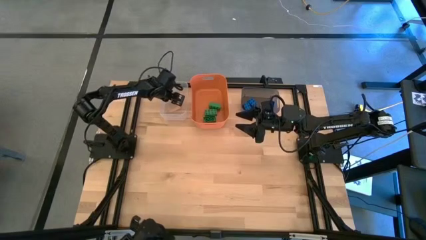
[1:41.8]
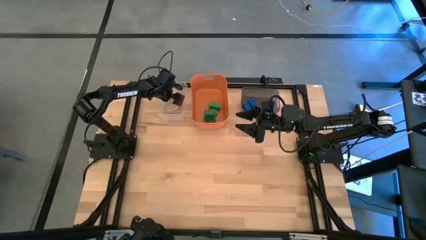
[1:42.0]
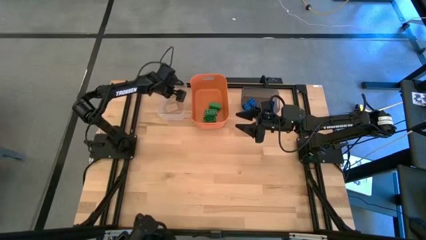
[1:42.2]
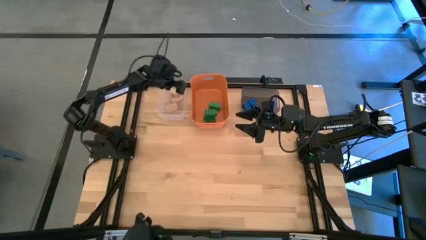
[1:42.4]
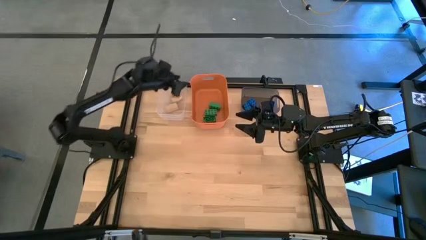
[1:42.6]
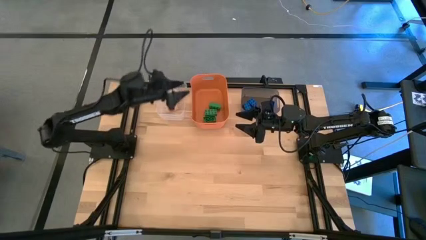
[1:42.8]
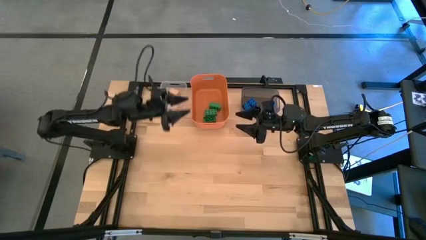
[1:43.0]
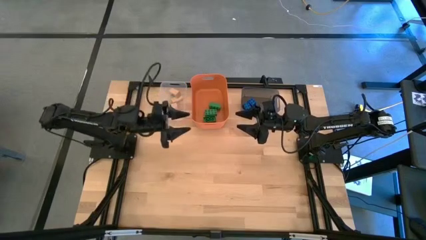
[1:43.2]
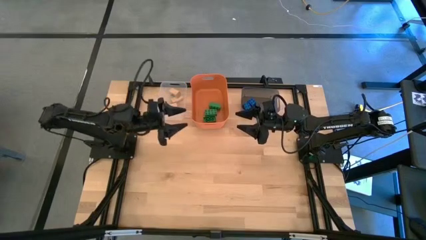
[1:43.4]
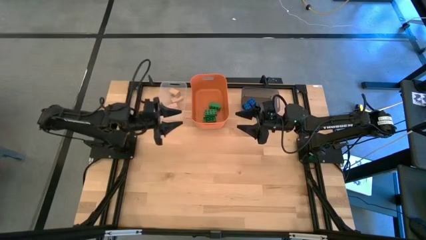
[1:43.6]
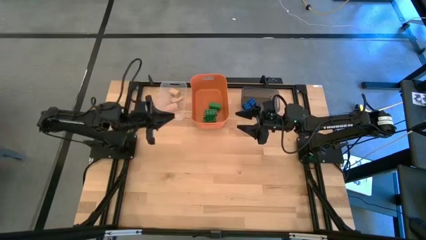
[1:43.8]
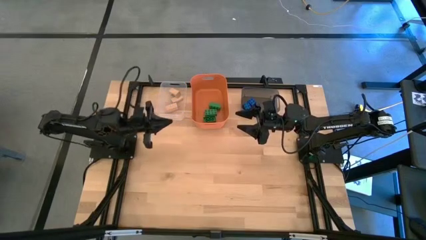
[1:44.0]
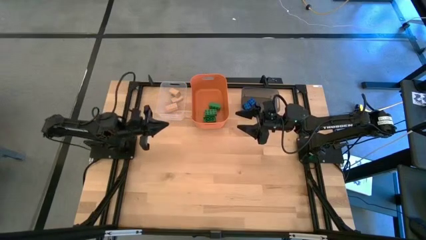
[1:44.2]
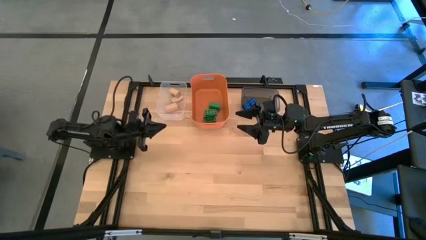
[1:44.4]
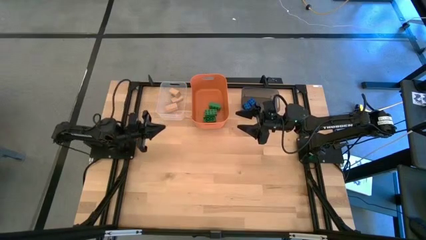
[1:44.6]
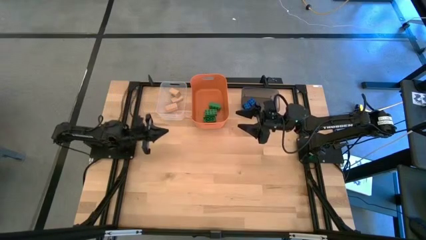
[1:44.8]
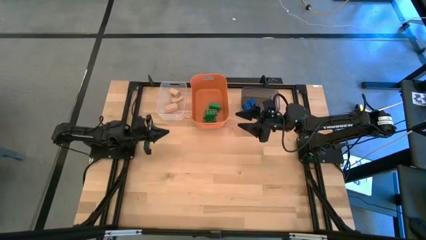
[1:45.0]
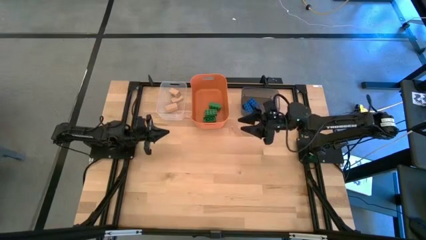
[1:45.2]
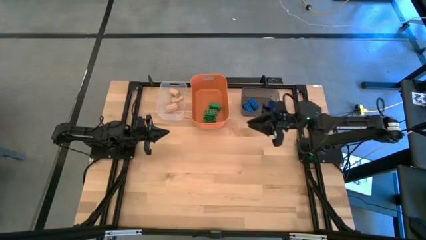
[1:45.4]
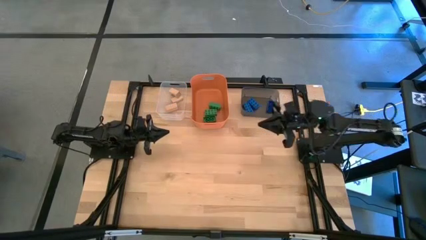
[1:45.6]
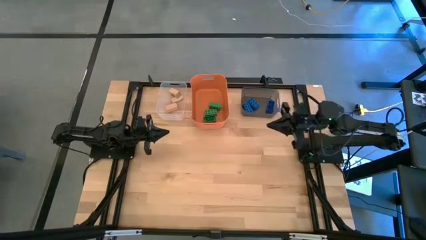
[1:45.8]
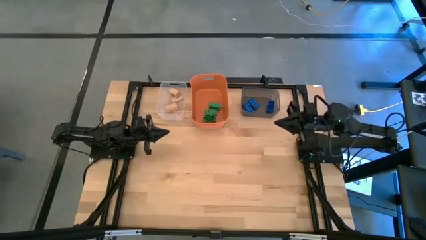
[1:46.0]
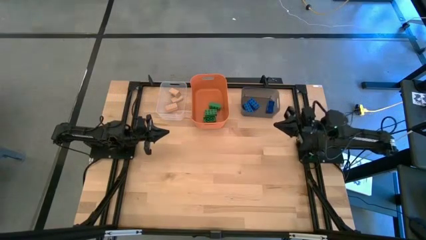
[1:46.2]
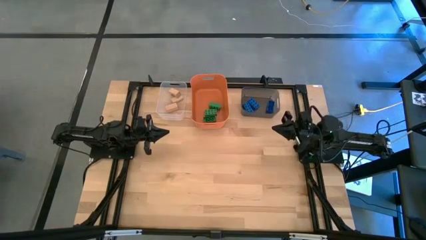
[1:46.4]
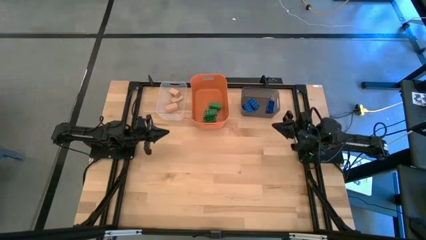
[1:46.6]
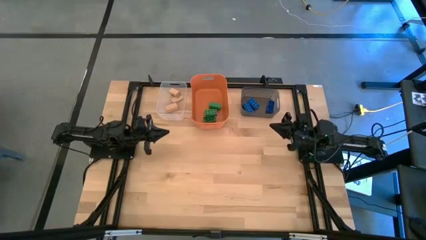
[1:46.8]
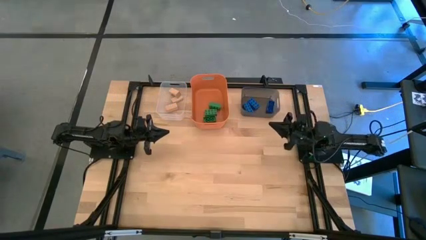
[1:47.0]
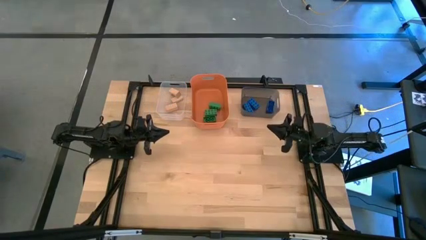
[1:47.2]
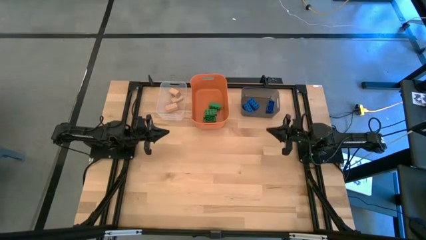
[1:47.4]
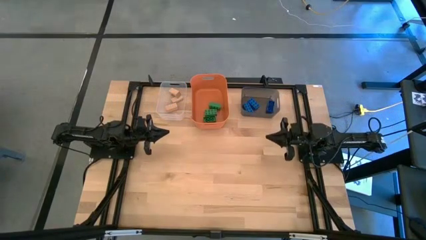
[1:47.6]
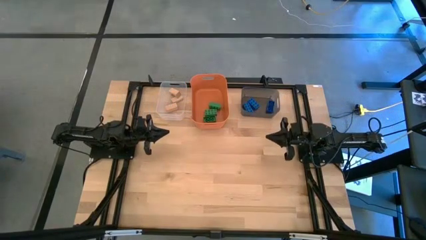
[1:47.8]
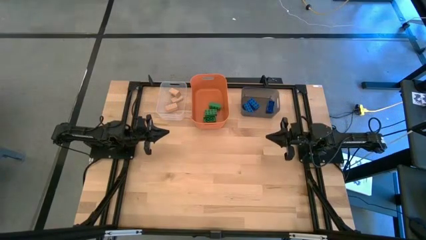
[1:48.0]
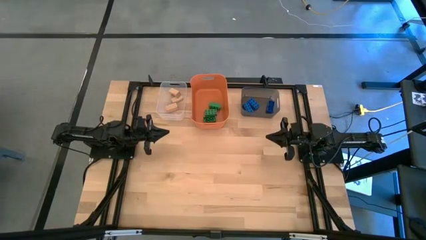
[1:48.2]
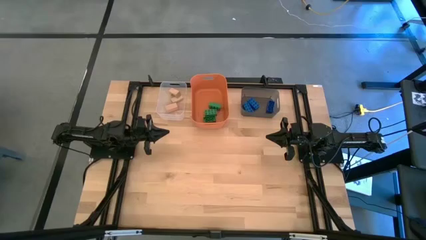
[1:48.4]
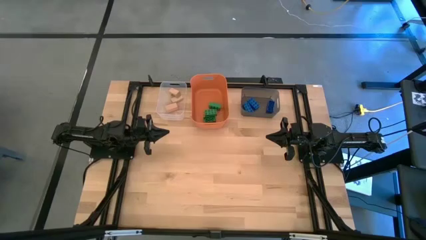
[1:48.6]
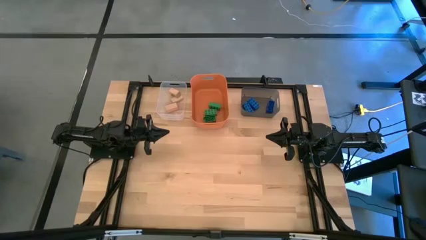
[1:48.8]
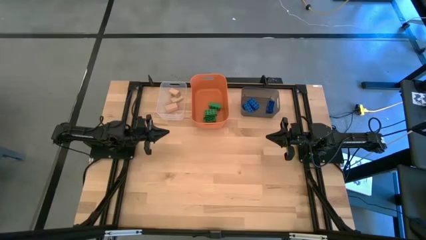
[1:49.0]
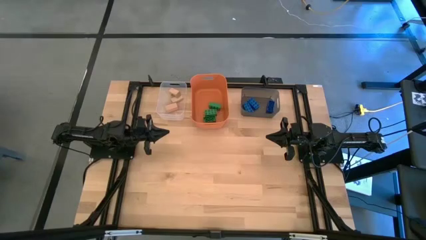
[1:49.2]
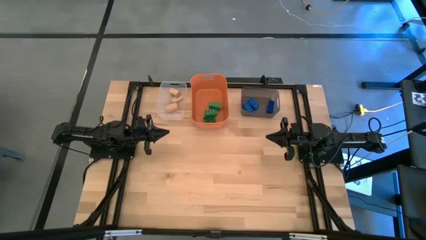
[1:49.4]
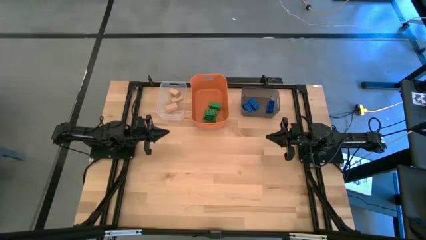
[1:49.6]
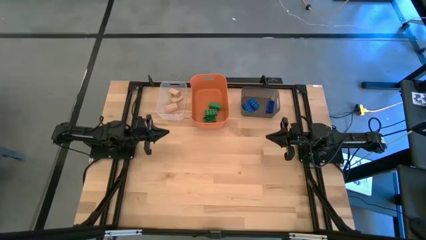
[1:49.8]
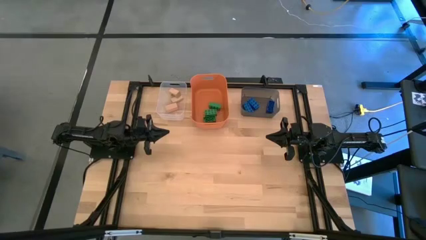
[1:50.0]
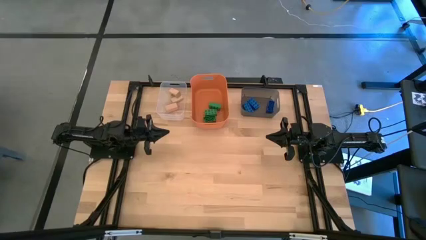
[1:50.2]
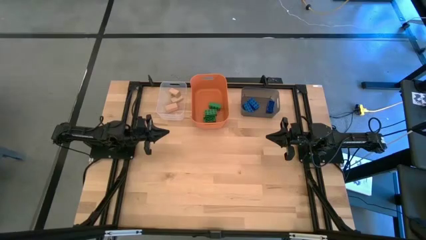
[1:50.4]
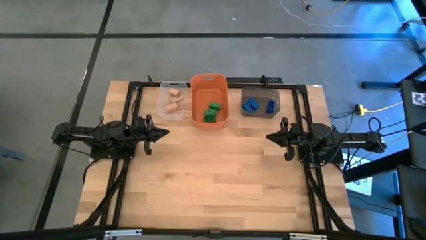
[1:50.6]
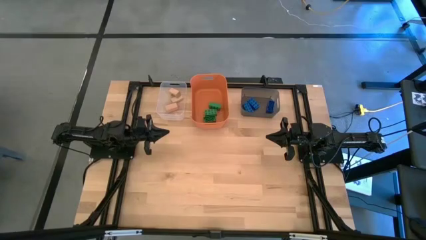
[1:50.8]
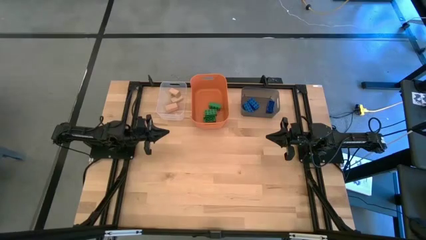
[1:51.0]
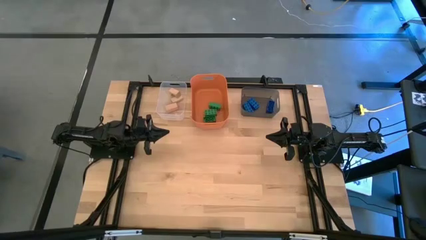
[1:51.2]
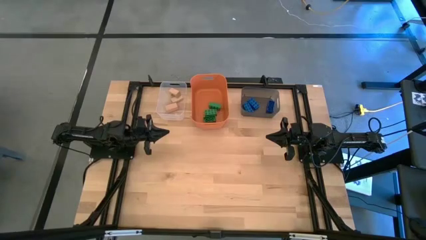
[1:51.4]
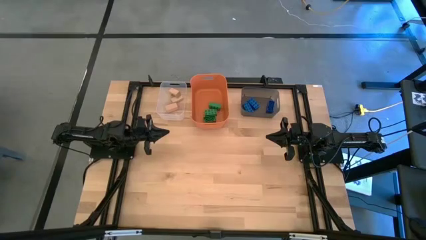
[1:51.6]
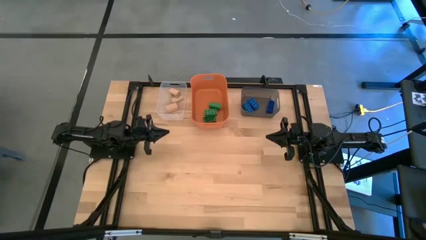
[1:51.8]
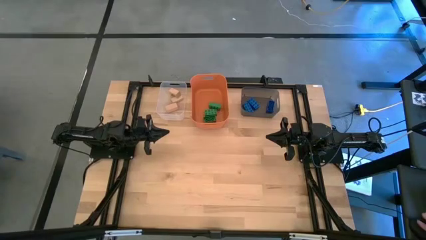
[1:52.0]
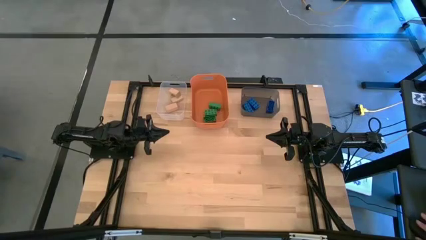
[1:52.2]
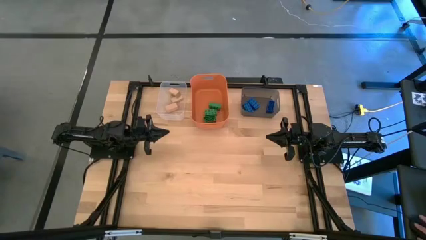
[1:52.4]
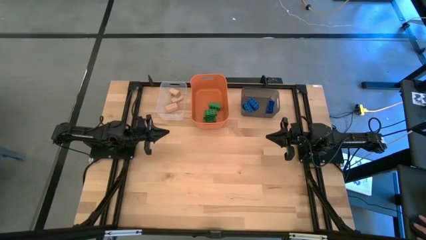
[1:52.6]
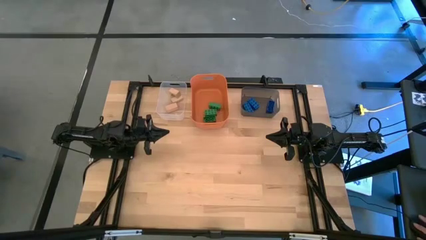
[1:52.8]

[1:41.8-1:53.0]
Task: Sort & place blocks by color
Return to Home Position

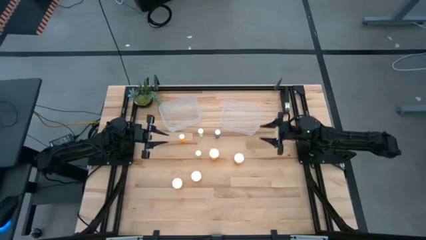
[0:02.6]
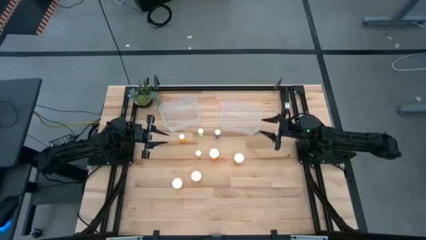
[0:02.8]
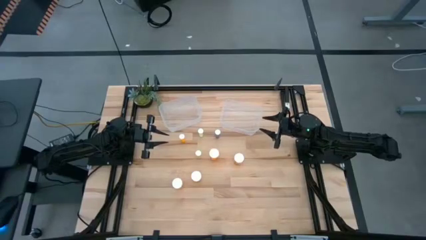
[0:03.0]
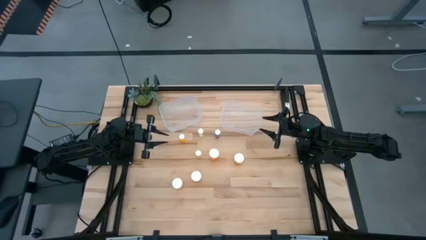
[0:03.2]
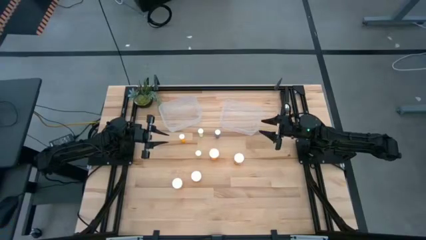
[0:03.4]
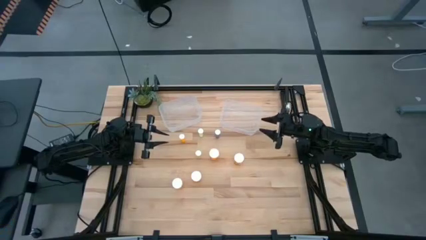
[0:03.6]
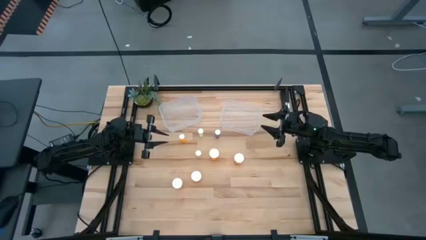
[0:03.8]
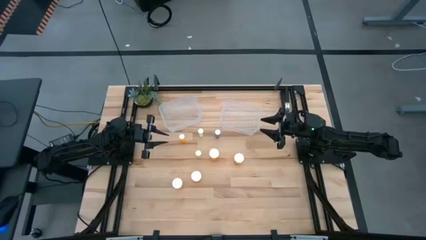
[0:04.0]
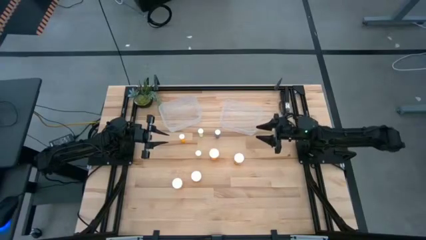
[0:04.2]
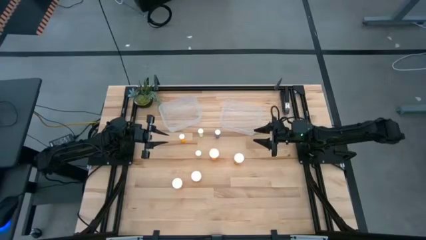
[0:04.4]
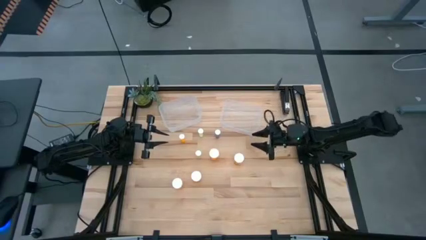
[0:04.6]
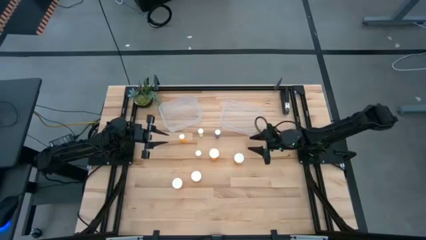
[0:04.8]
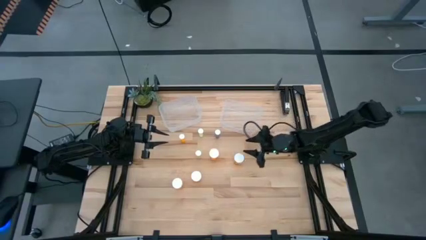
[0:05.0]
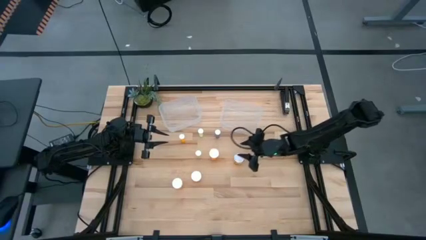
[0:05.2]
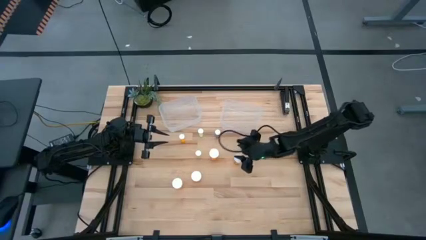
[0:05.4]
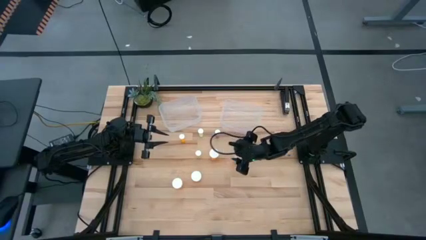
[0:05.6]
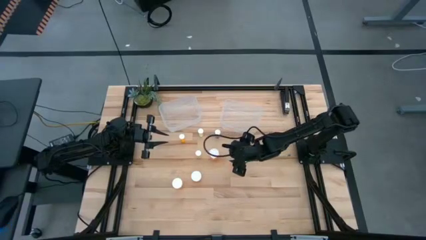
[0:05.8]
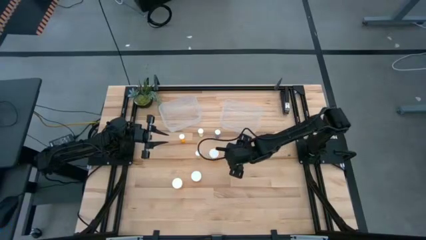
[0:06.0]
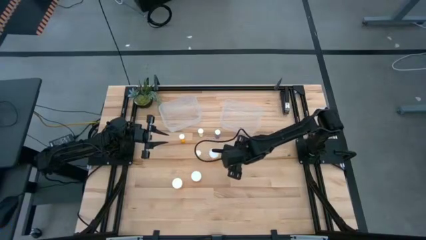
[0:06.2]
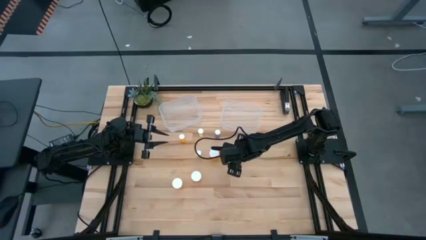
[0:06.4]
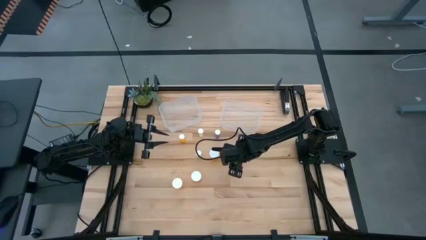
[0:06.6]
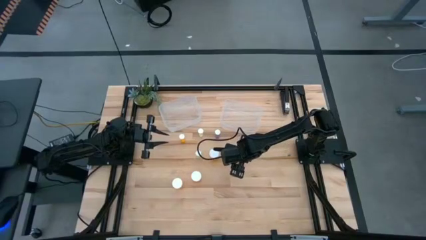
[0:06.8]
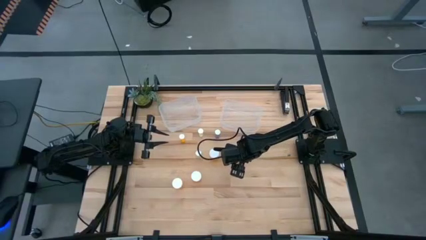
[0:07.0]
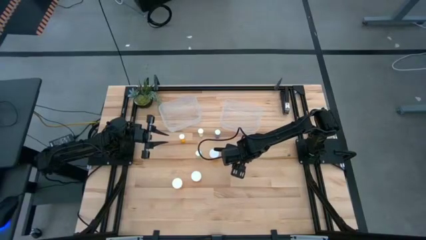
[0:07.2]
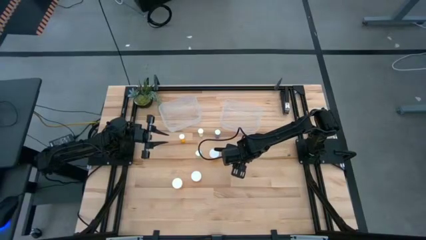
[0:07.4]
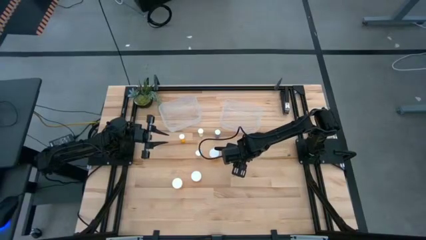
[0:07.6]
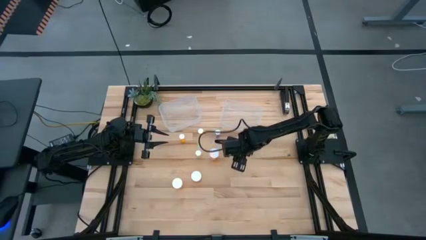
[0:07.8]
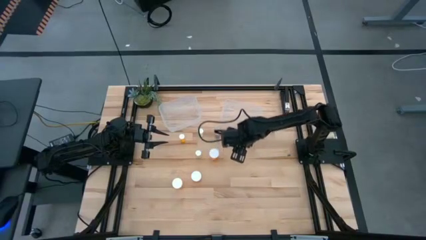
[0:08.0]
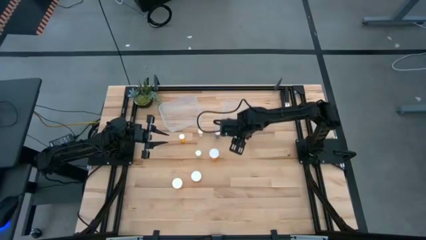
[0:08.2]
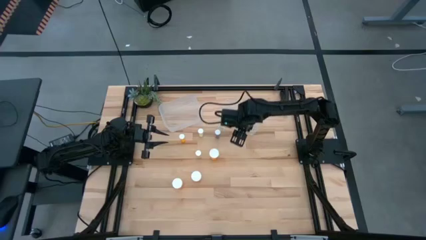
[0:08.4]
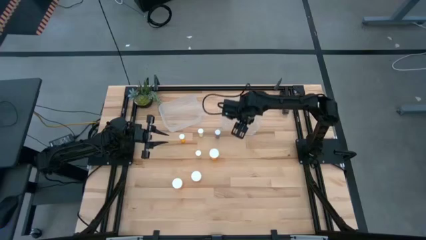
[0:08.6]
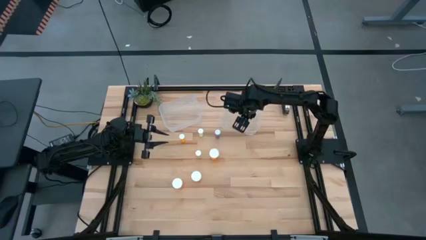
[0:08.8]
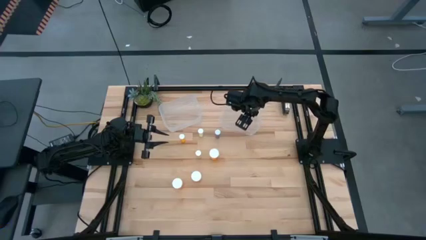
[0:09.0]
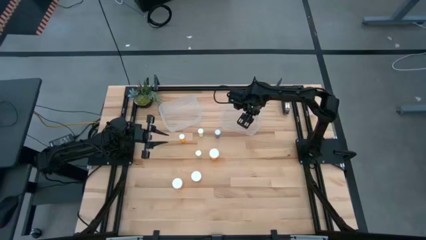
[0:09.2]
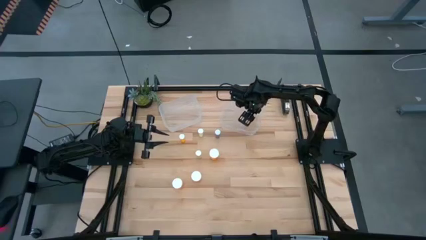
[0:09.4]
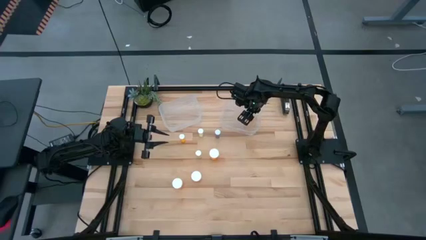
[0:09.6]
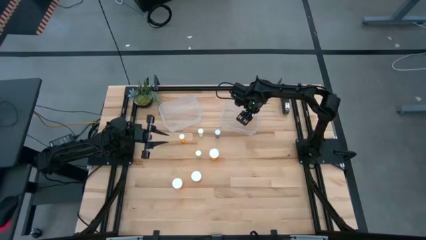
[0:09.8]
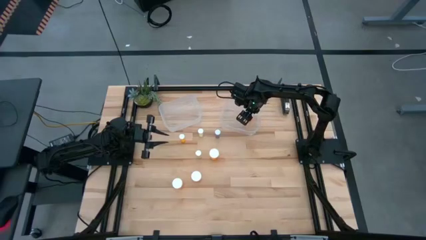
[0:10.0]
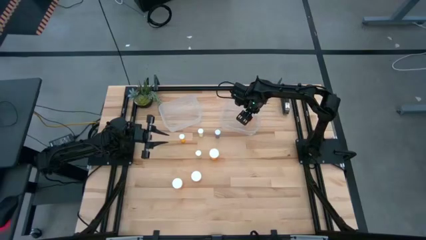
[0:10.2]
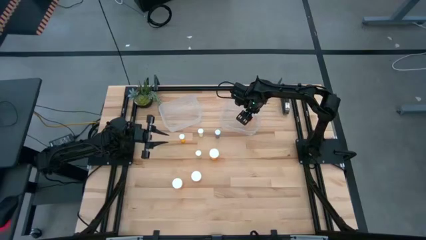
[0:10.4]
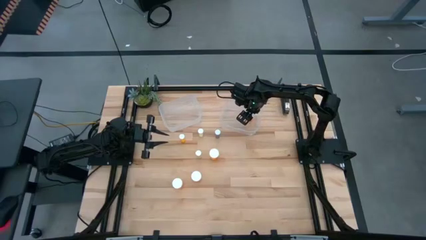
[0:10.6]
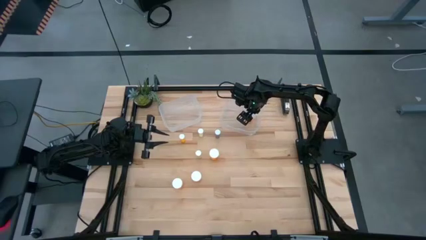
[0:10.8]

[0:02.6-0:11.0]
Task: Pick and place medicine bottles into bin by pill shape (circle, oval)
Put the orange pill bottle into the right bin
